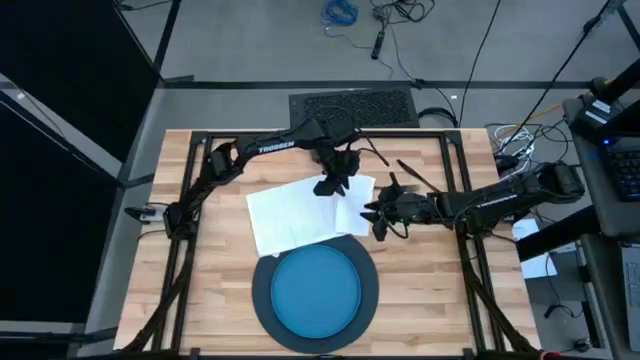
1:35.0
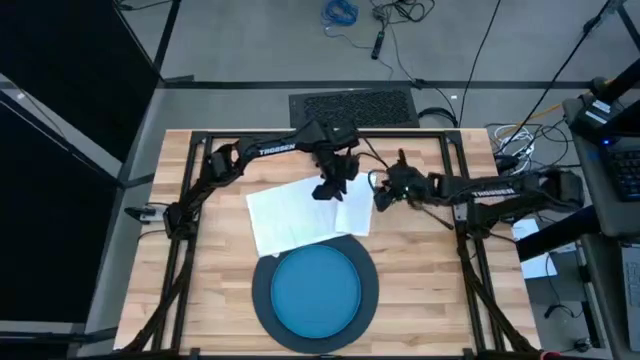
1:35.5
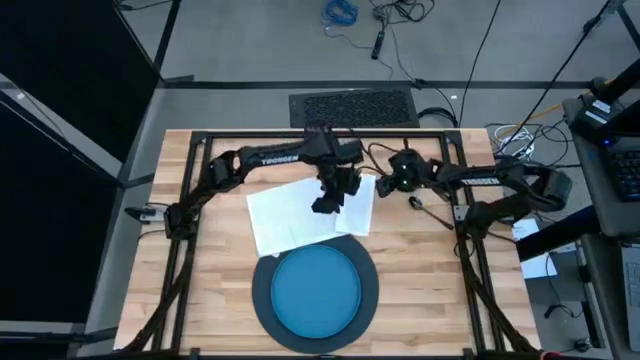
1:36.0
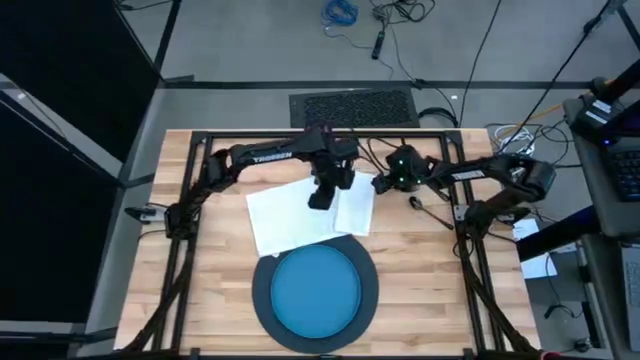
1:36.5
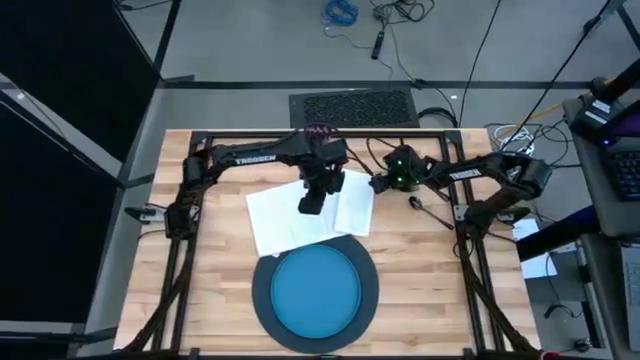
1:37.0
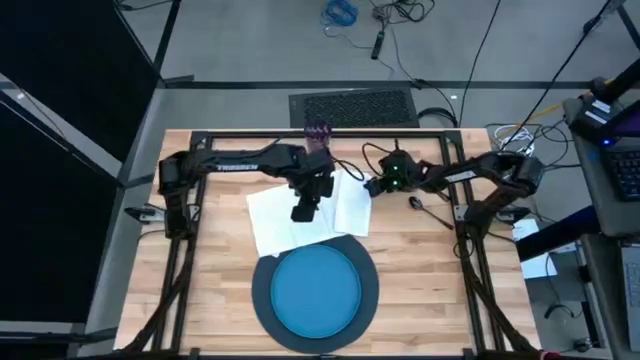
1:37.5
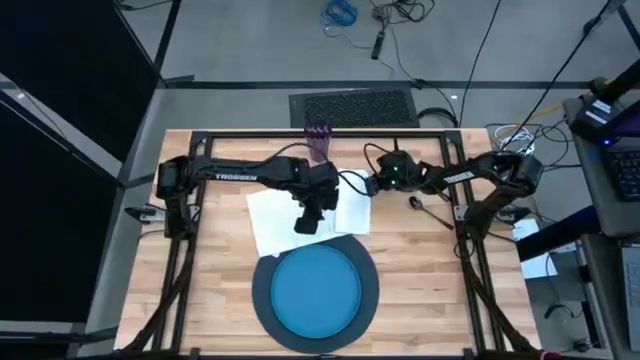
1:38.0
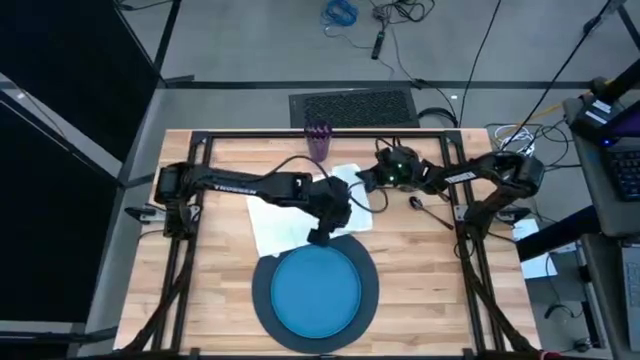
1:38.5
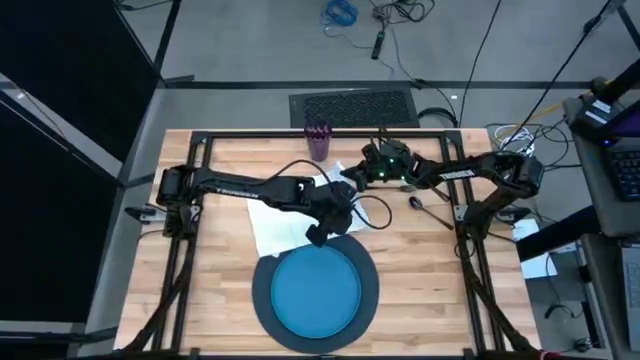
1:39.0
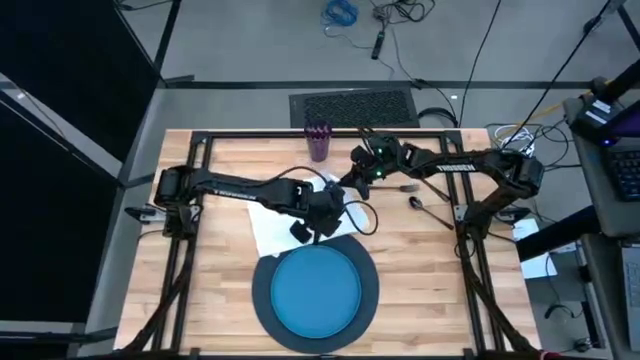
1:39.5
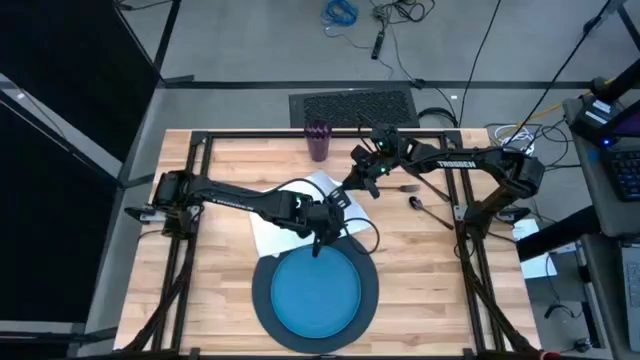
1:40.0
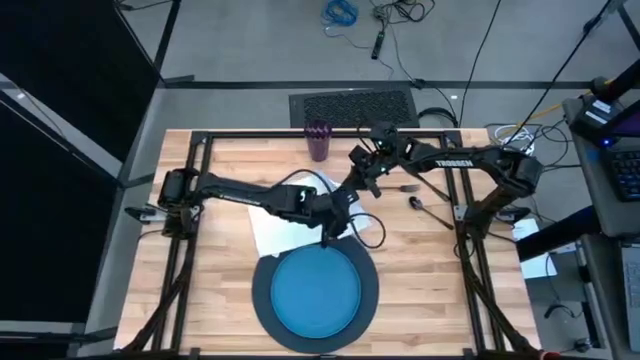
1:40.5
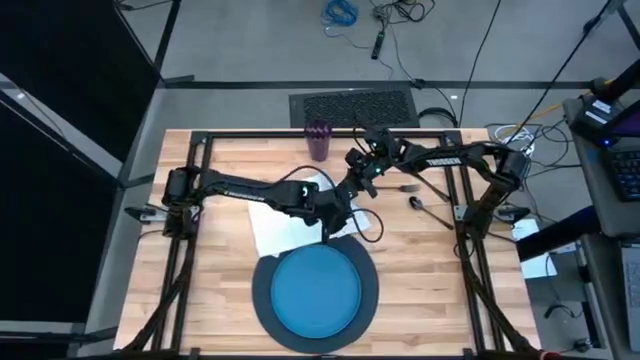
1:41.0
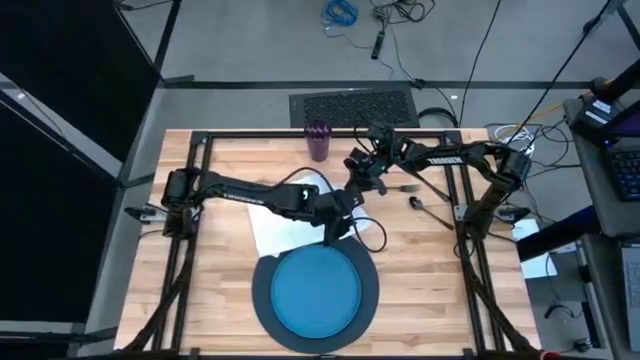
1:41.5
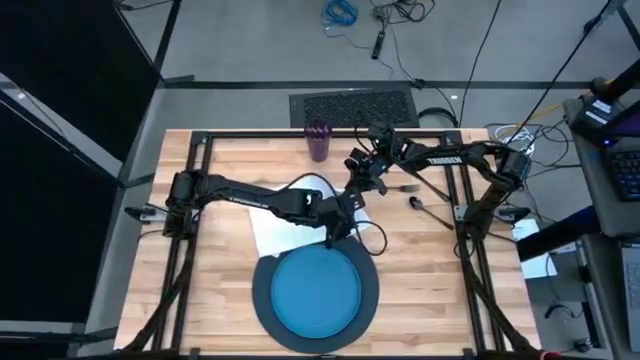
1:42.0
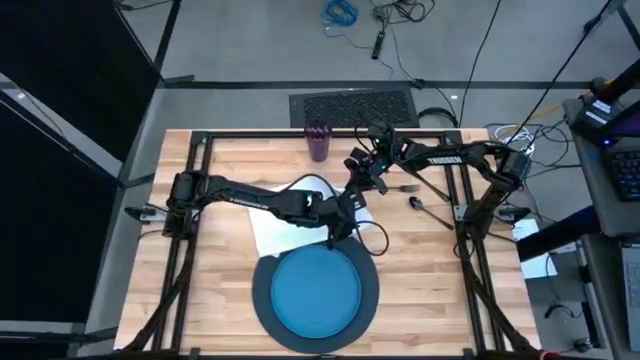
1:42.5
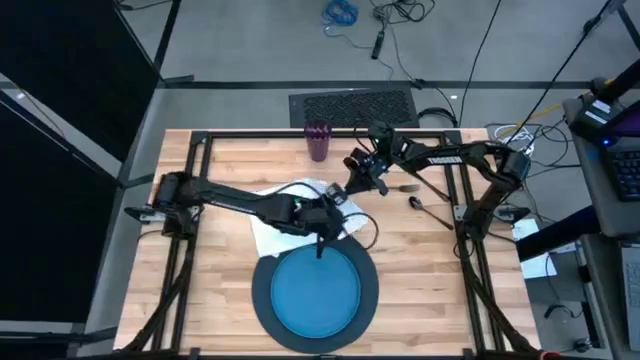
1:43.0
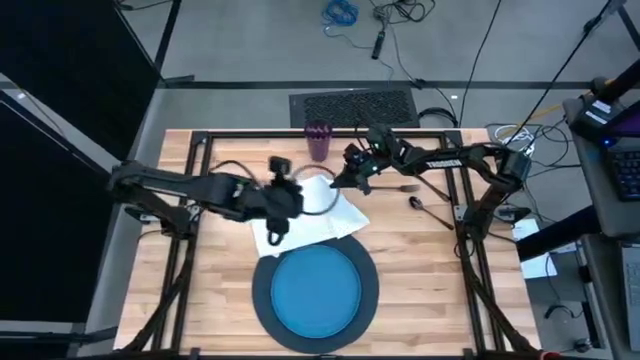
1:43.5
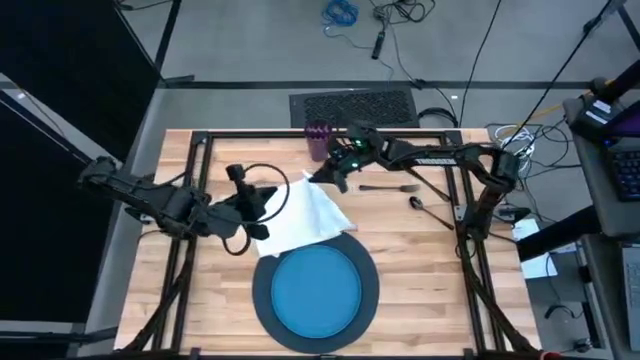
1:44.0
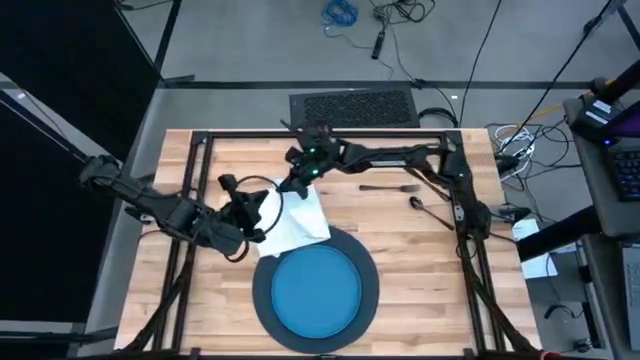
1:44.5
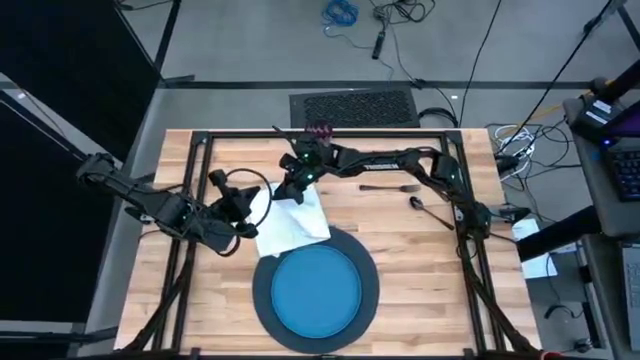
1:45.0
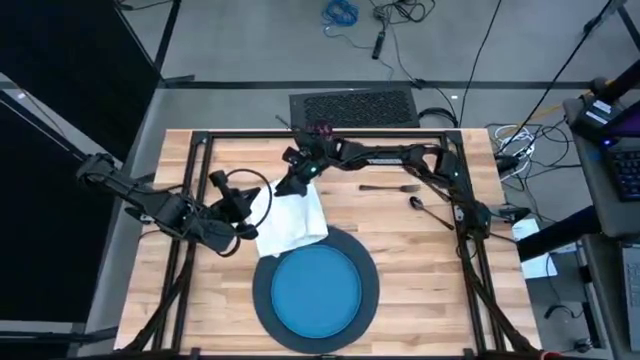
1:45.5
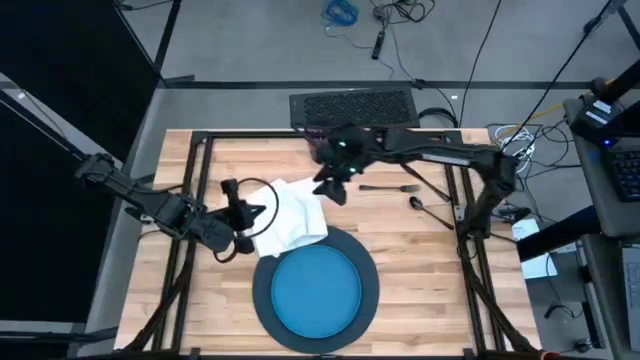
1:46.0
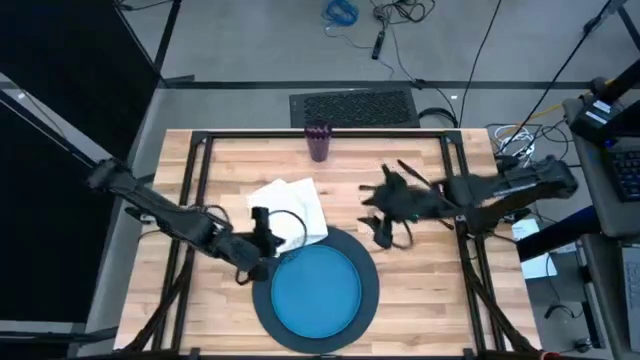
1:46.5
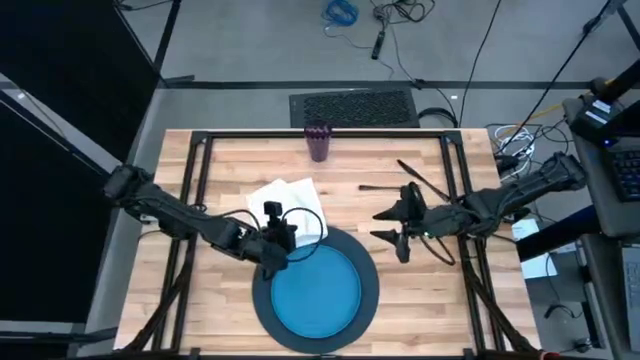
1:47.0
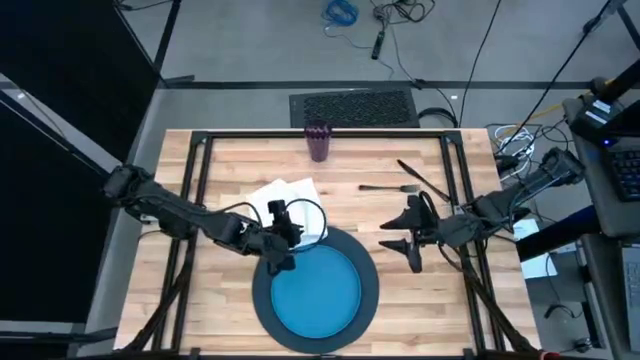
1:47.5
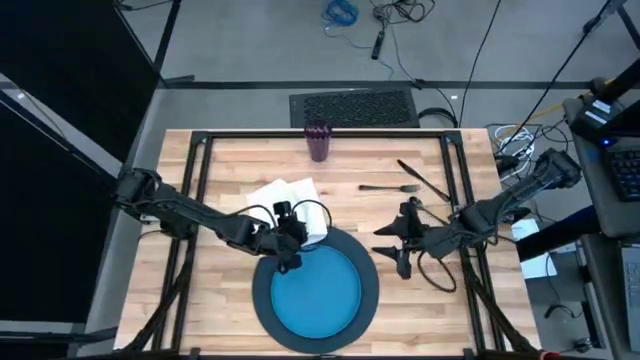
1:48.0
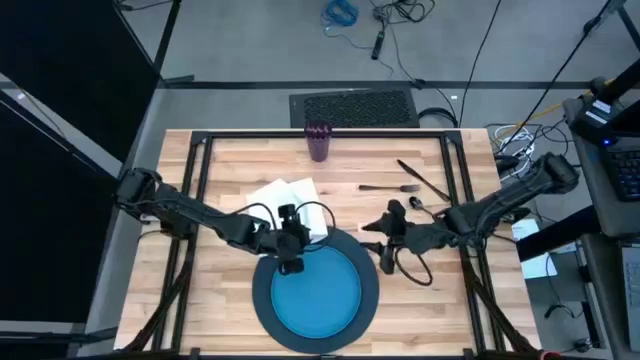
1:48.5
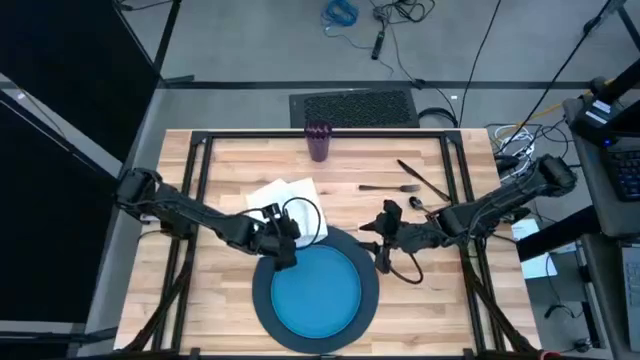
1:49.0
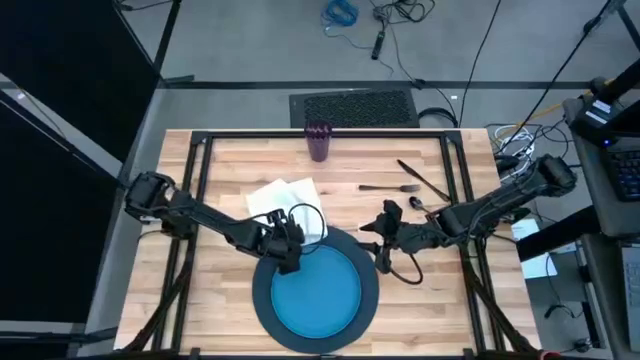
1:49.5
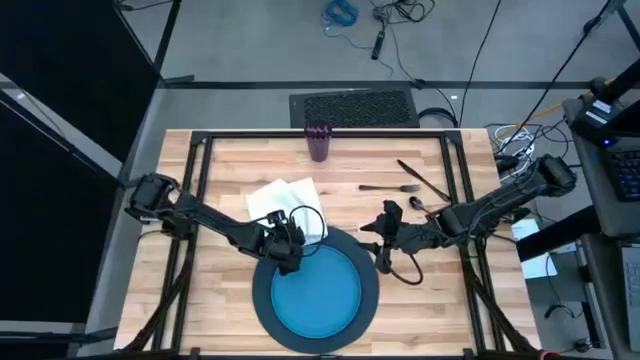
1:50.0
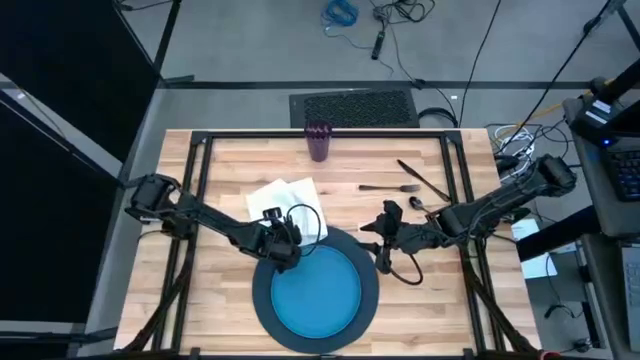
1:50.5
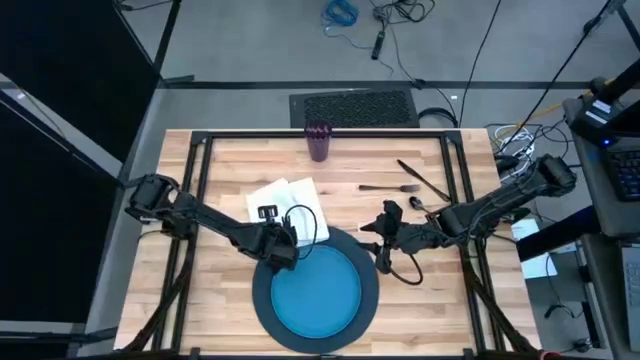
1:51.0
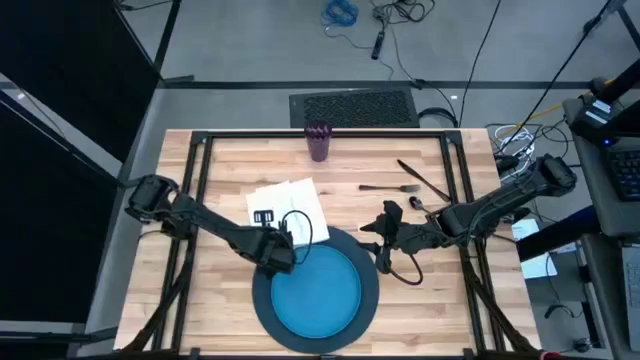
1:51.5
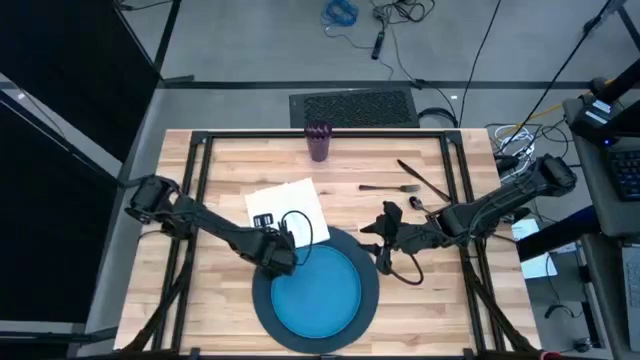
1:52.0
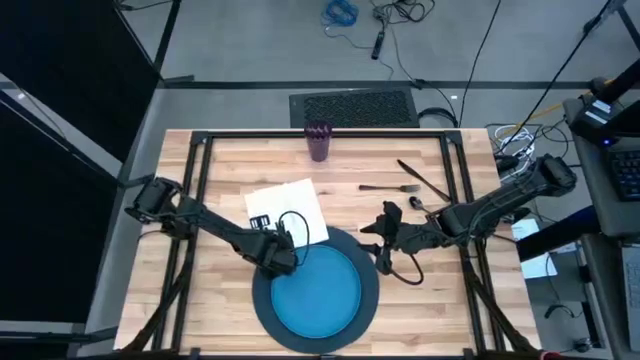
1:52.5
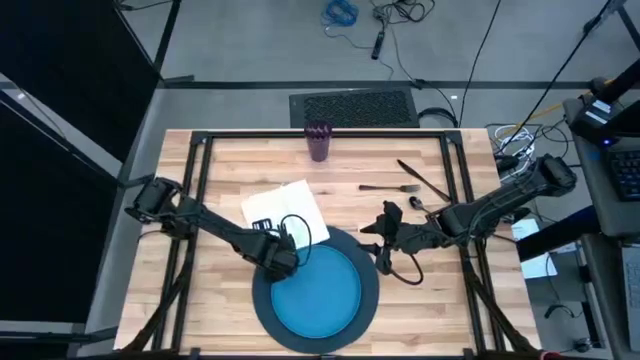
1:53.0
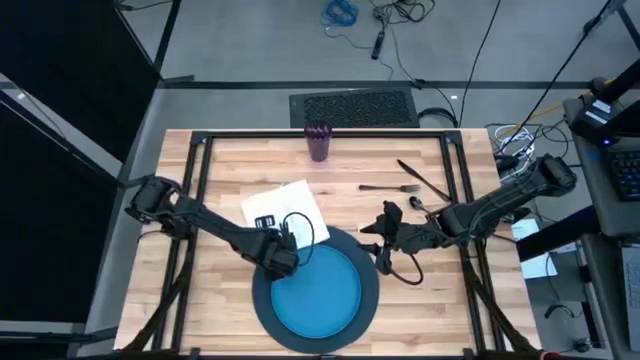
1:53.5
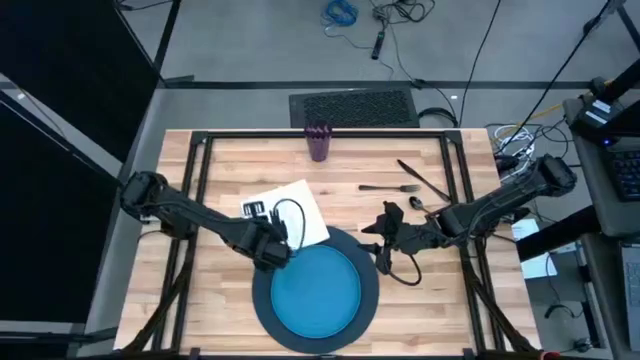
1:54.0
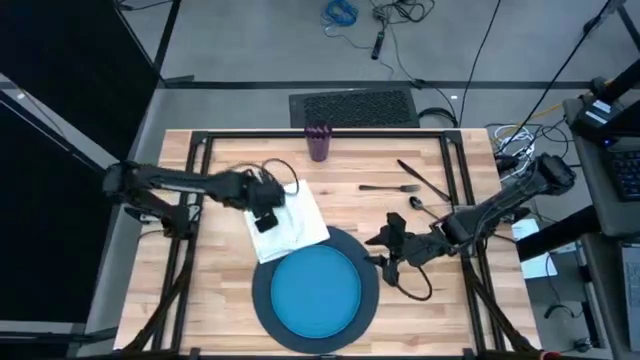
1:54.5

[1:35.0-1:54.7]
Task: Set table place
Fold the white table napkin on the table

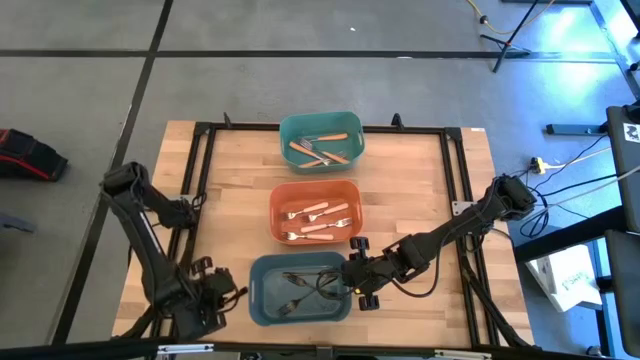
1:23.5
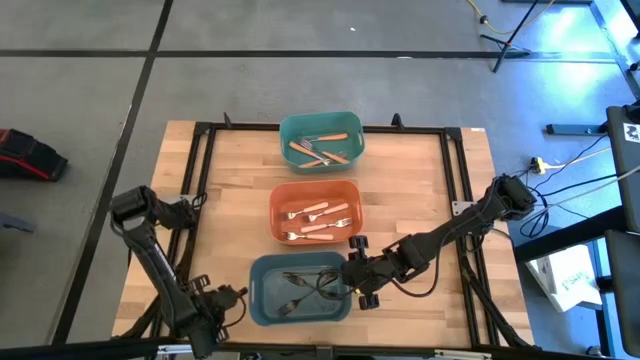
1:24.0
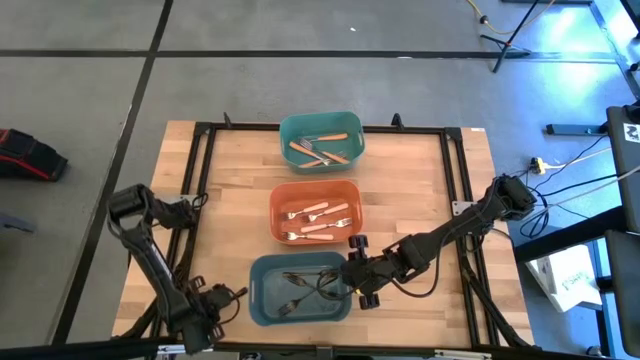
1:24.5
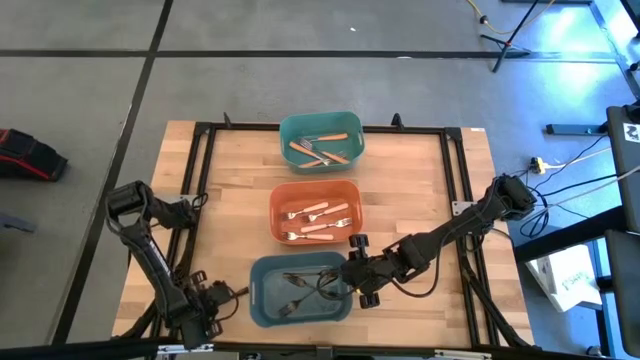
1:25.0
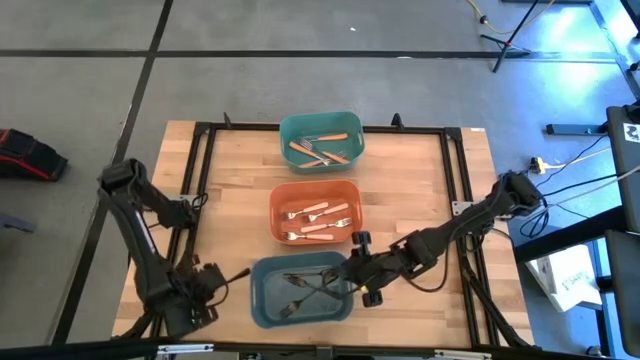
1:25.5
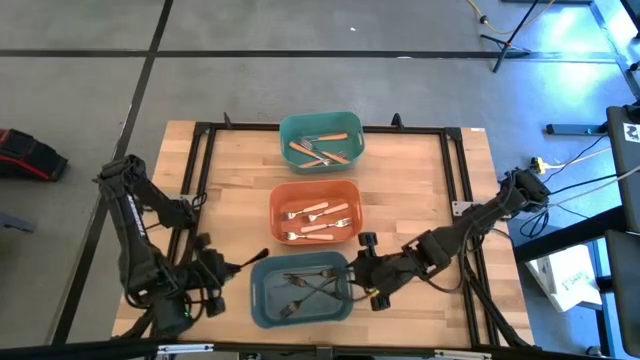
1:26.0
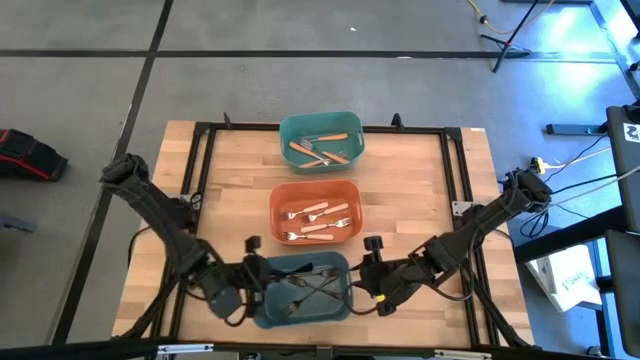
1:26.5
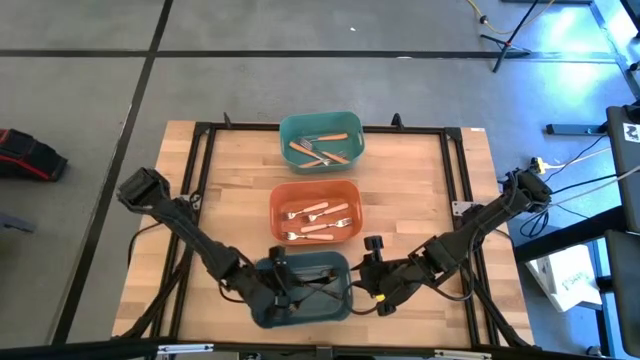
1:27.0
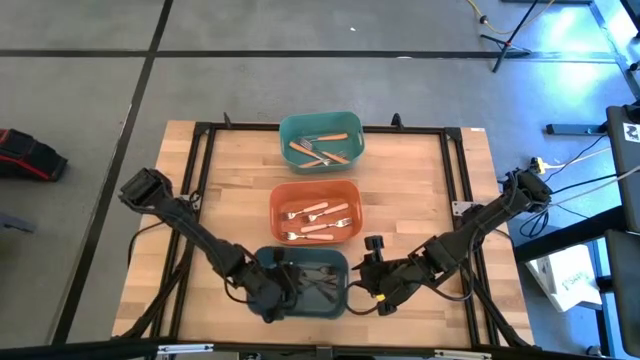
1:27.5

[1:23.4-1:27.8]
Task: Sort silverware by color (type)
Put the black fork into the blue bin
